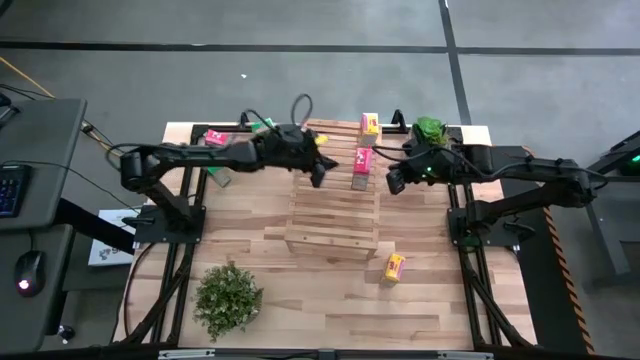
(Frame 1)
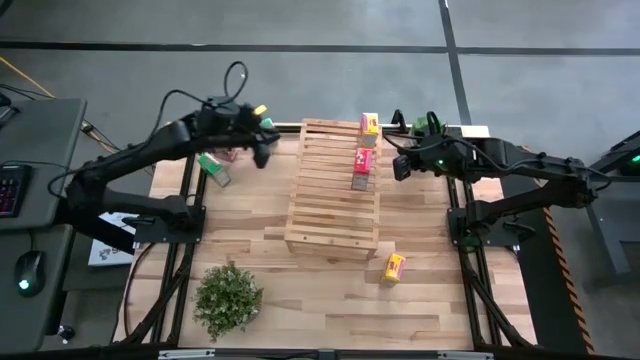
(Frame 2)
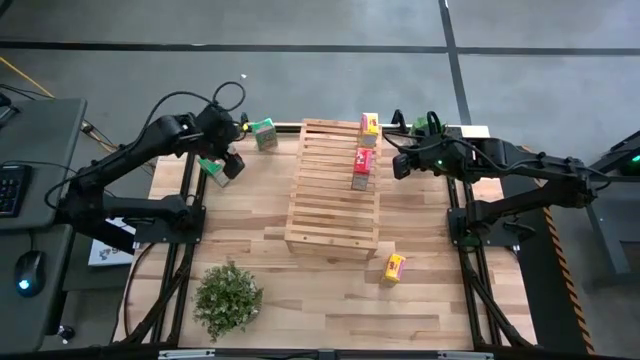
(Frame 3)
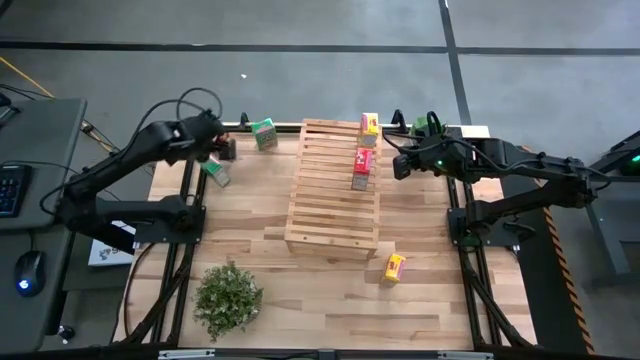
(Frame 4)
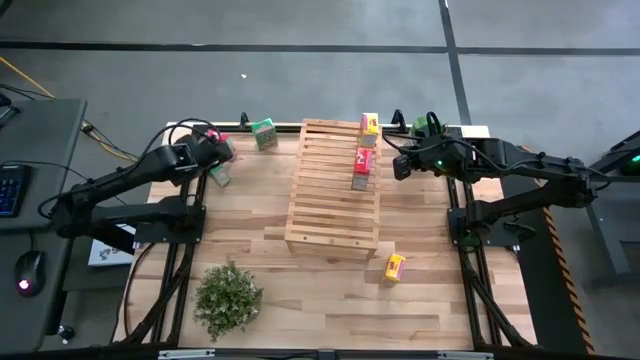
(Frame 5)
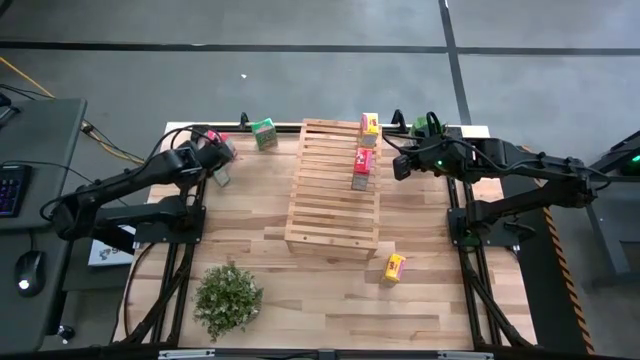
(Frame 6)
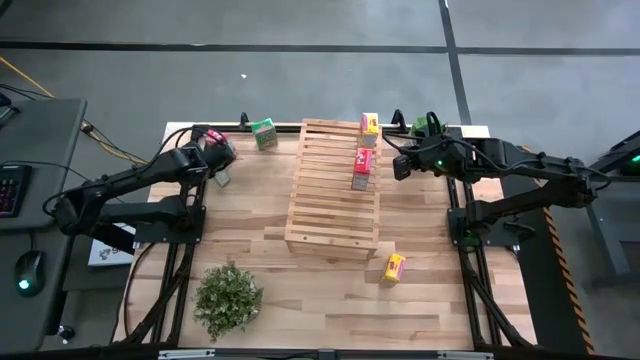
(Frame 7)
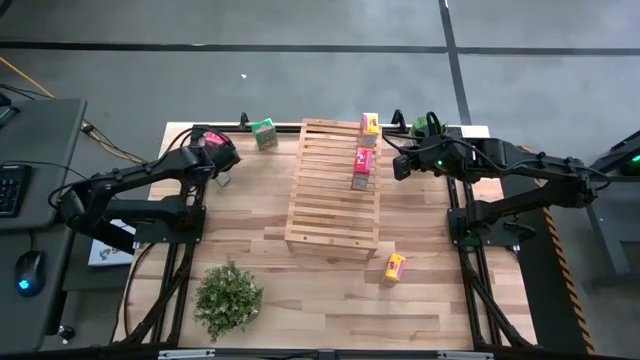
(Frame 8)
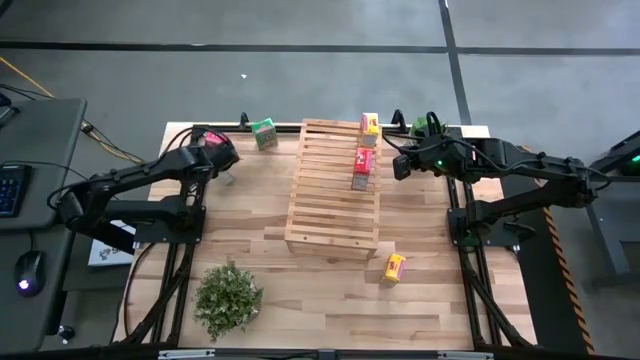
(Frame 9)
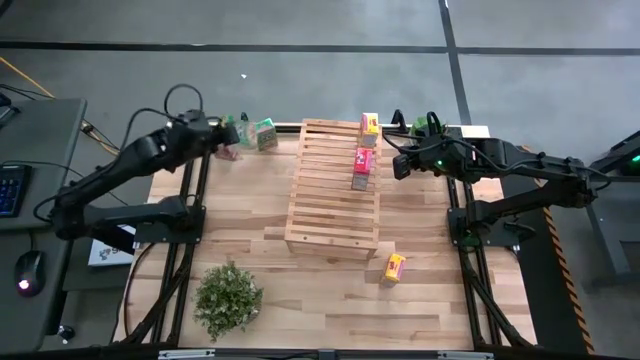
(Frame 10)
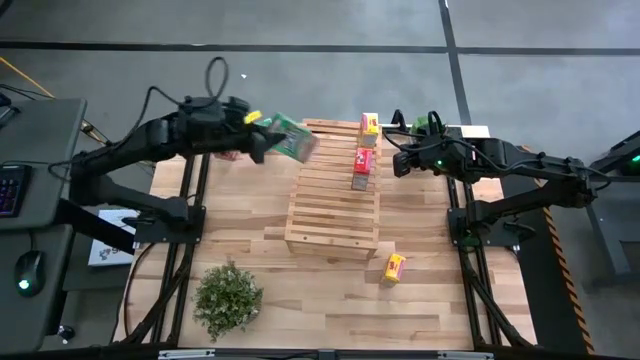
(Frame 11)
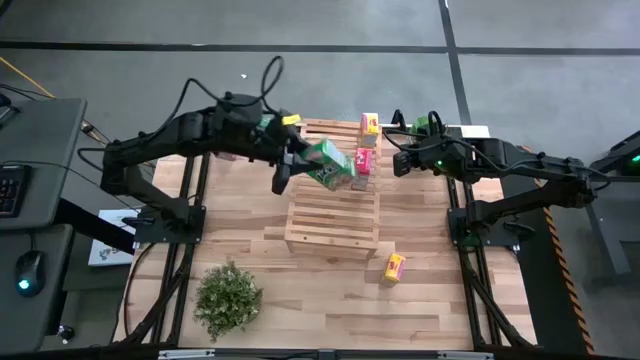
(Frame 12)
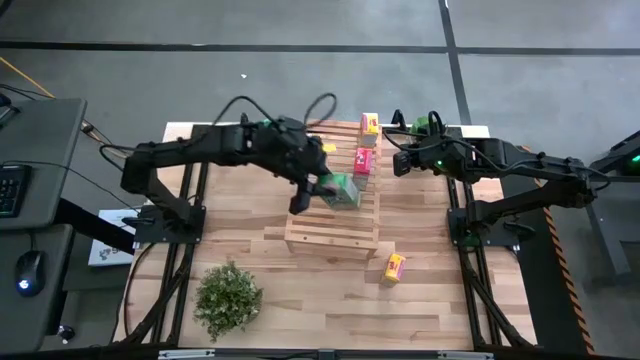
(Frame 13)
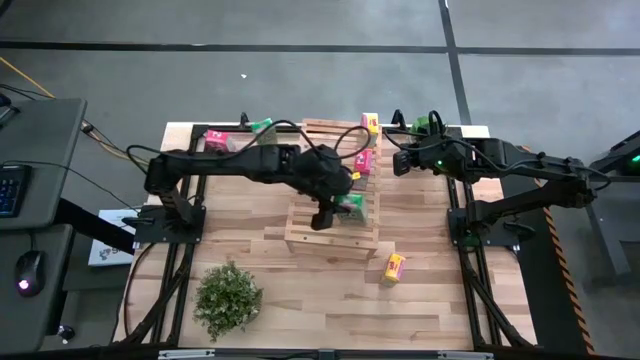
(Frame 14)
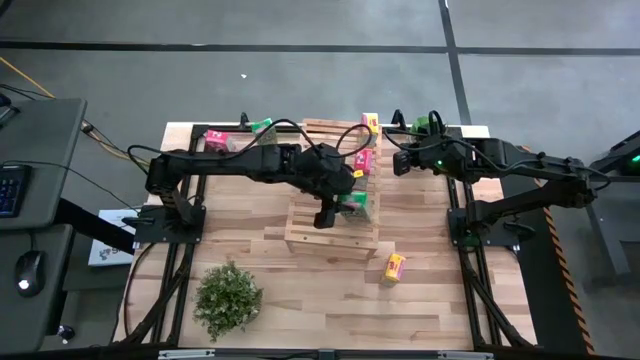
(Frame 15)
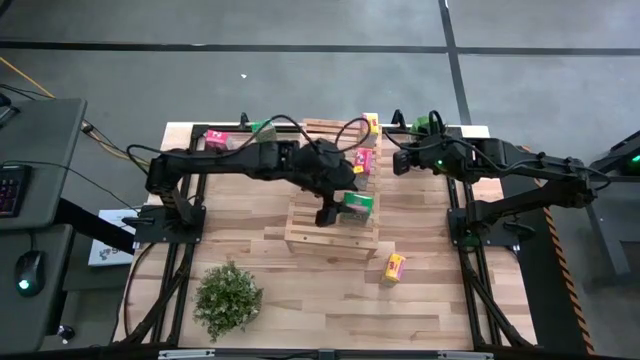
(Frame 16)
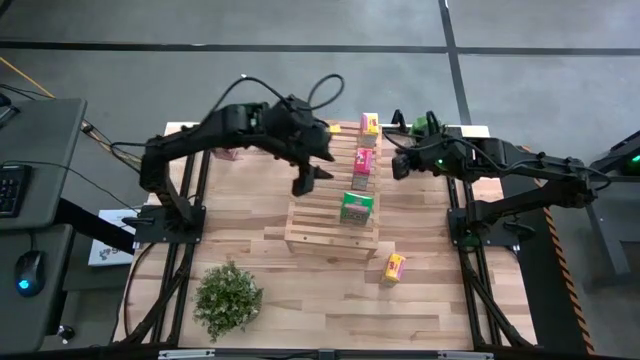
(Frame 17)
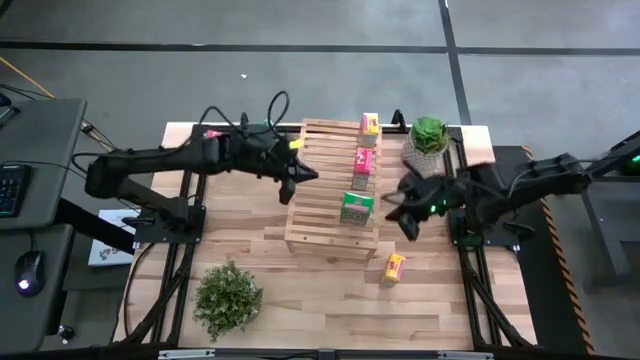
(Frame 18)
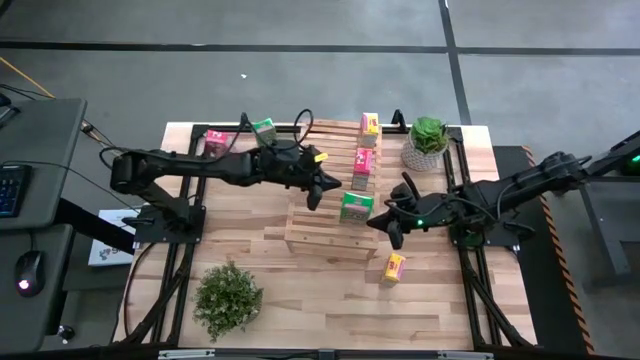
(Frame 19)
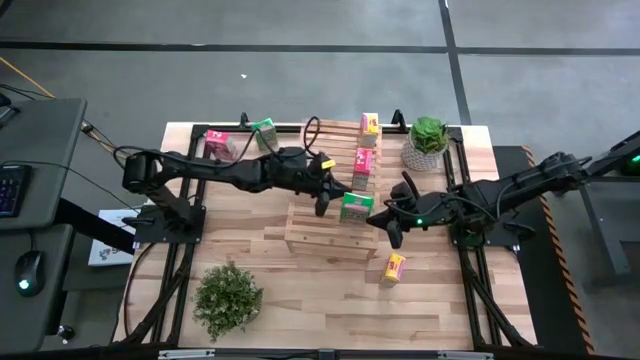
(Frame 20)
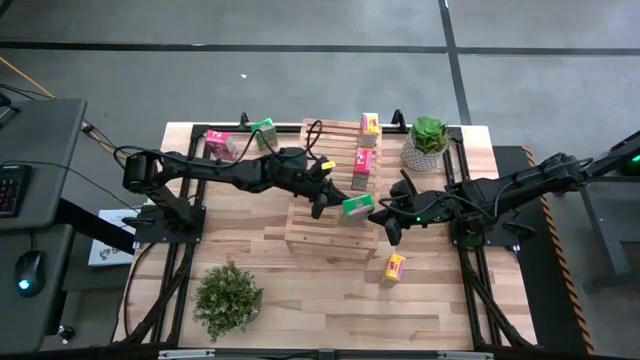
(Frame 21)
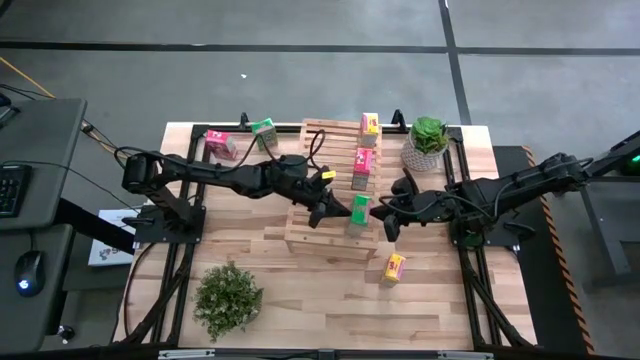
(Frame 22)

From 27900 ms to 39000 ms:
Task: Stack cereal on shelf
Put the bottom green cereal box on the shelf

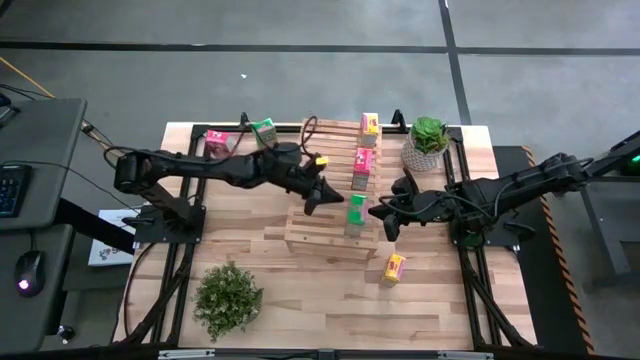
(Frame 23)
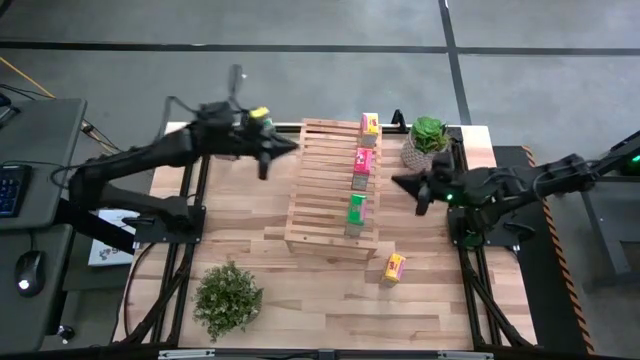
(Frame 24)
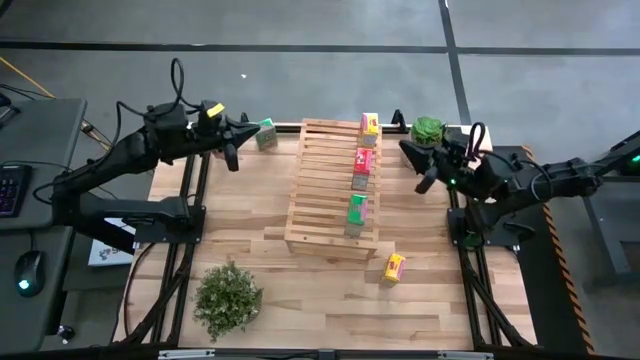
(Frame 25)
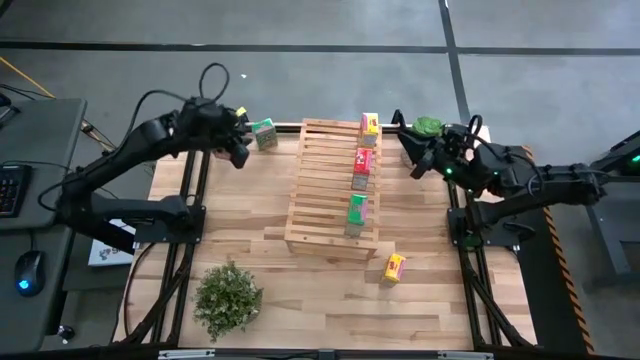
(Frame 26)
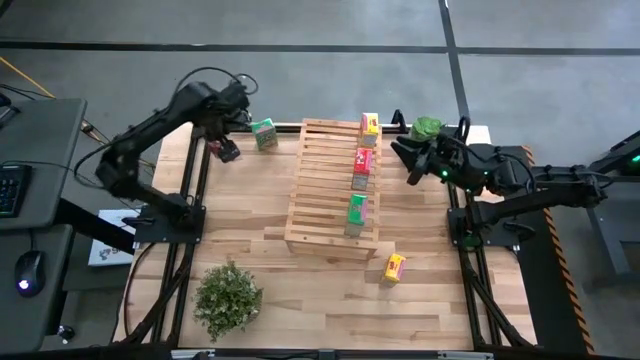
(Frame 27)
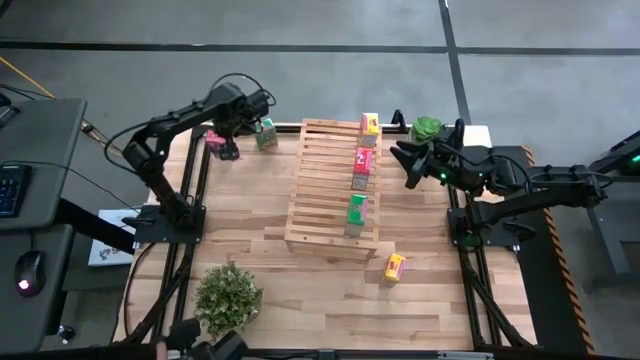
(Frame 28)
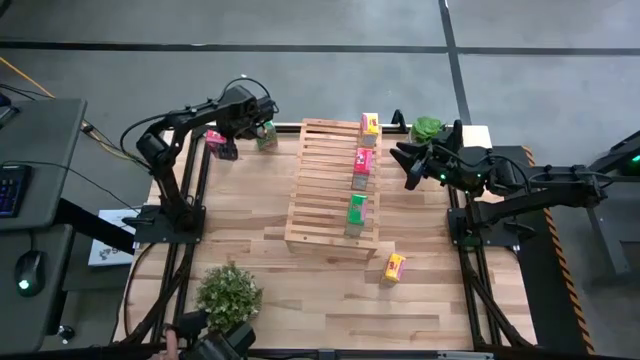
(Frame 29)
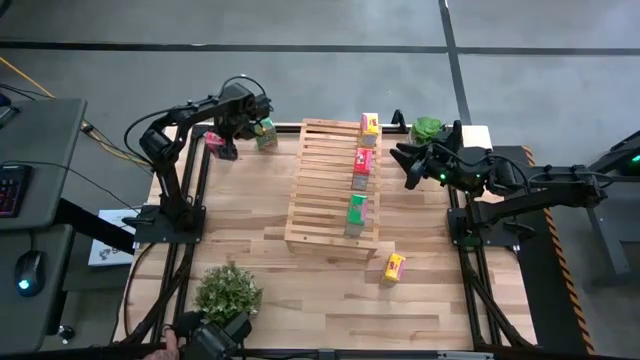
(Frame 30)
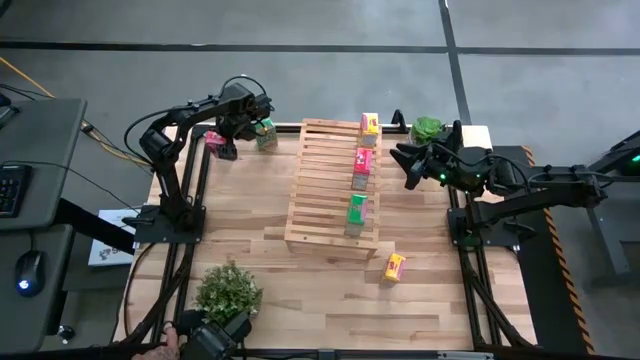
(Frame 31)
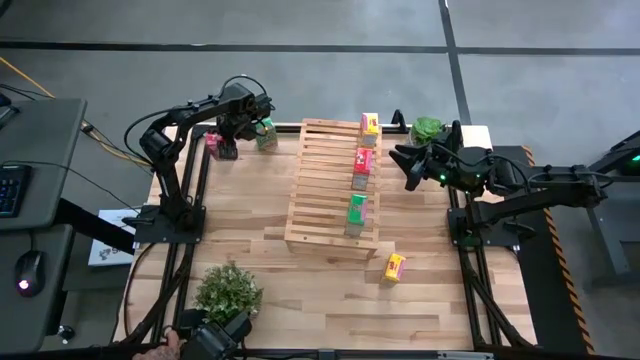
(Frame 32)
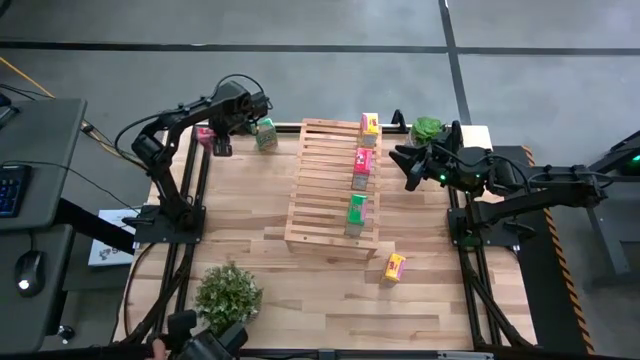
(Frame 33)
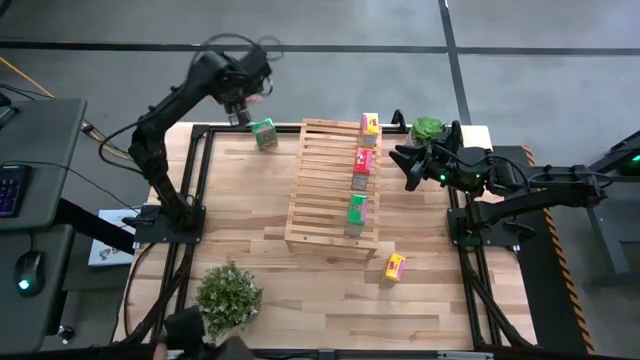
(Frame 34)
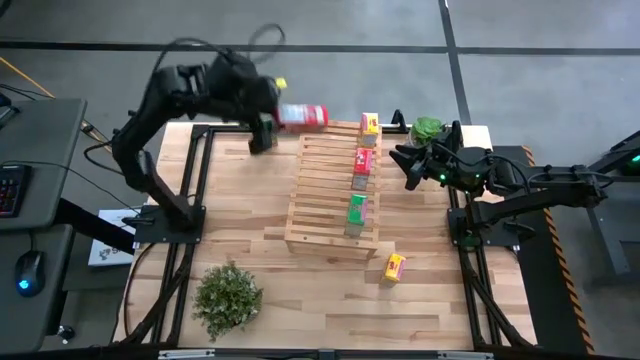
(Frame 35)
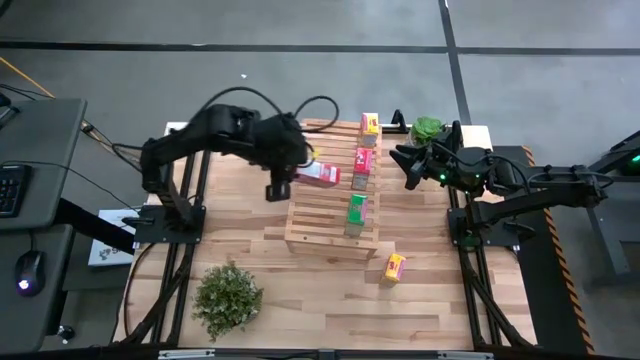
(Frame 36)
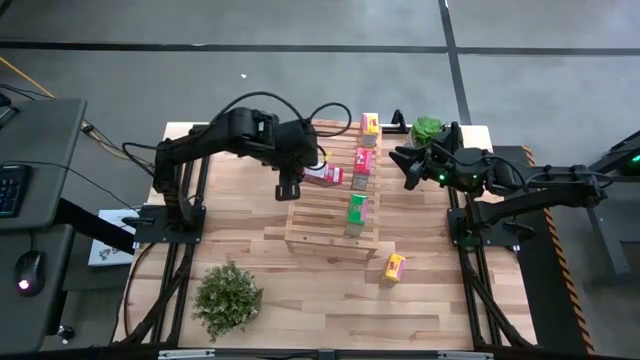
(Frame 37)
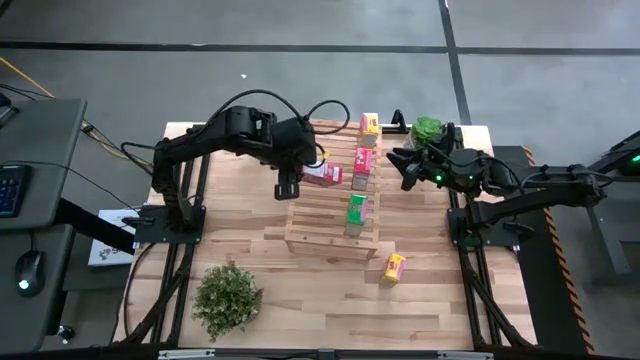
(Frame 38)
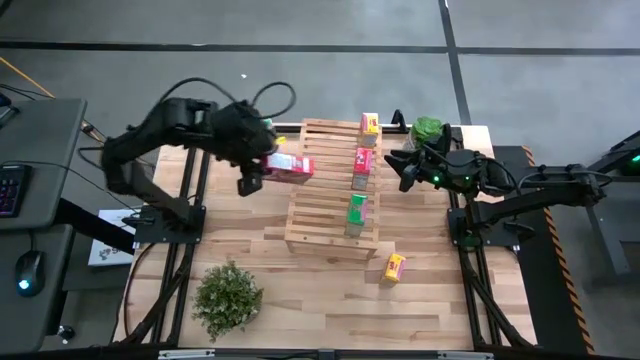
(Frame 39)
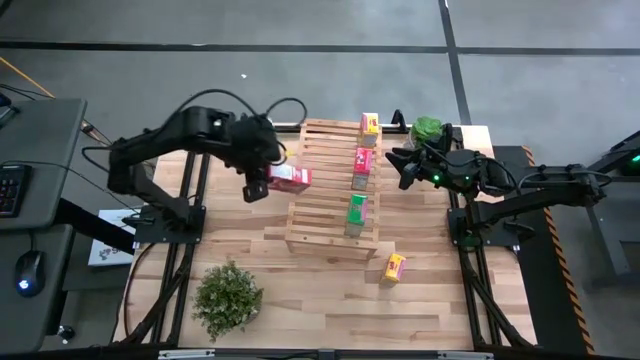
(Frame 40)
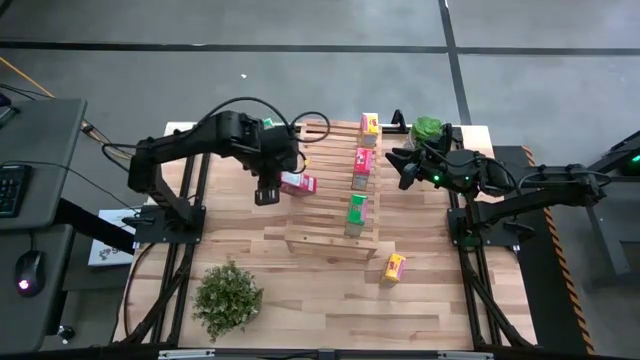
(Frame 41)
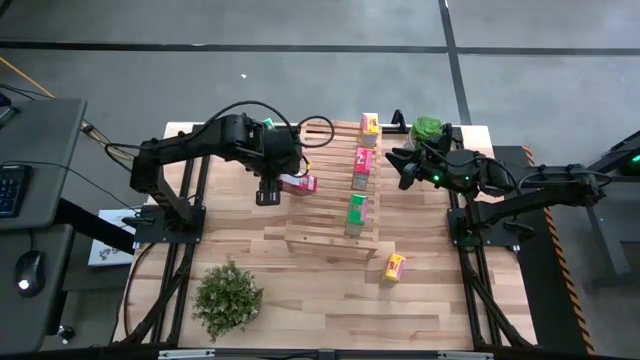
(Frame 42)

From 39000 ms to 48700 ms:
Put the red cereal box on the shelf aligned with other red cereal box

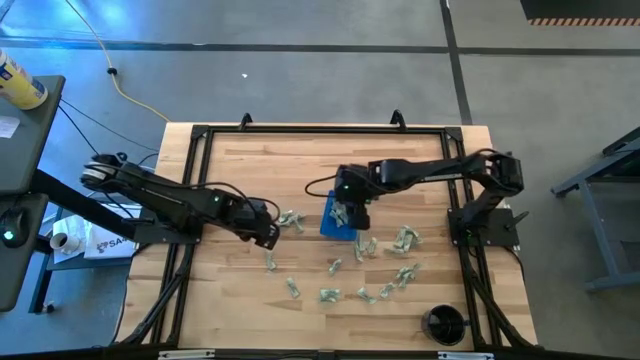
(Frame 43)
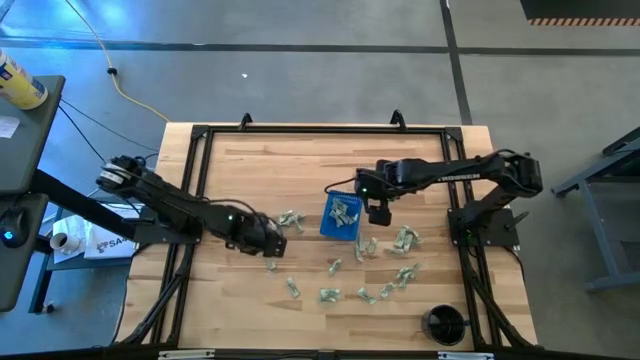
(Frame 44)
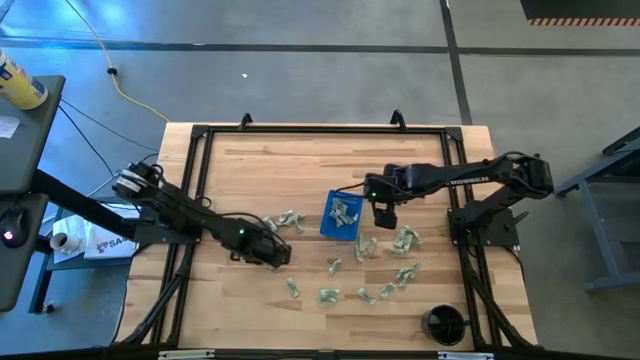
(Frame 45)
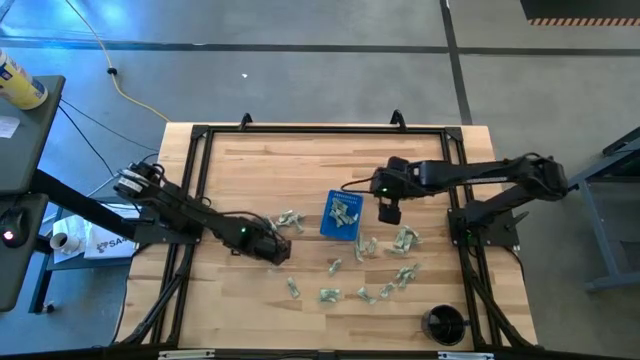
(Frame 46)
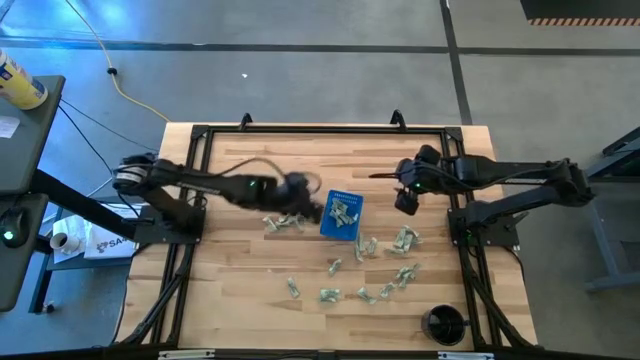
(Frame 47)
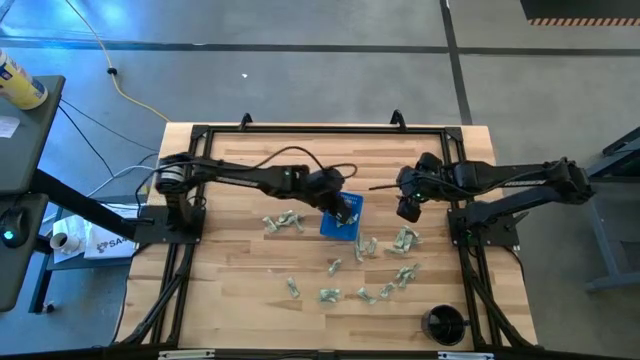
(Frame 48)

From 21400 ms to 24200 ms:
Task: Pick and place Stevia / Truvia into bins
Put the stevia packet into the blue basket
